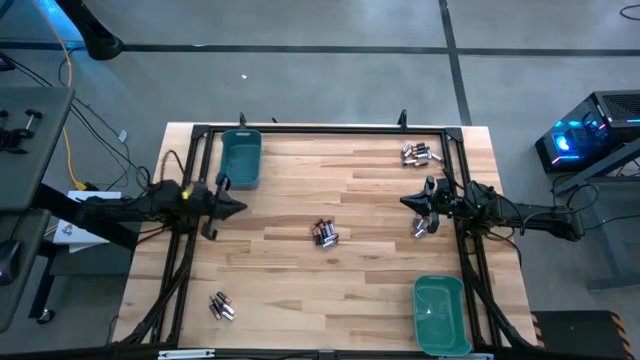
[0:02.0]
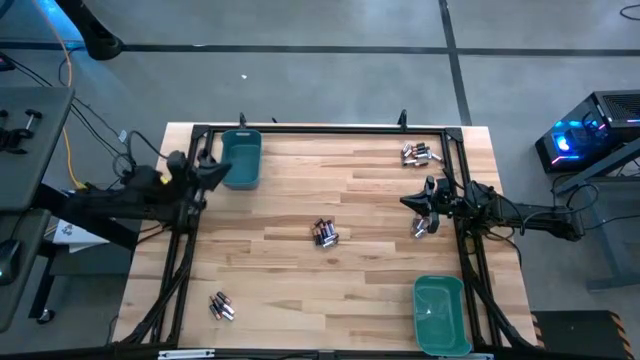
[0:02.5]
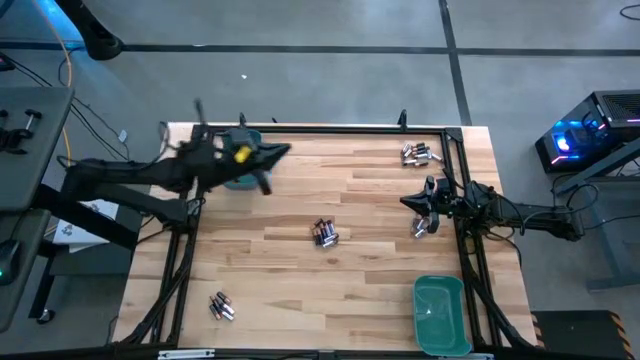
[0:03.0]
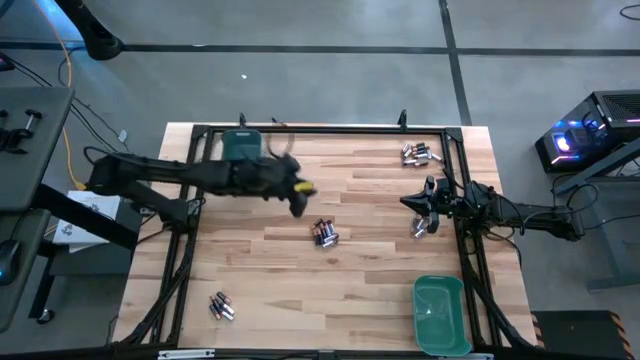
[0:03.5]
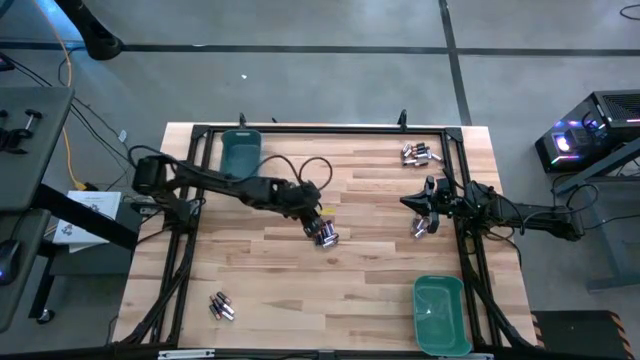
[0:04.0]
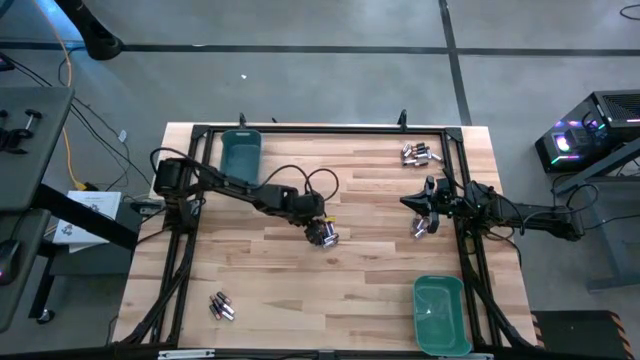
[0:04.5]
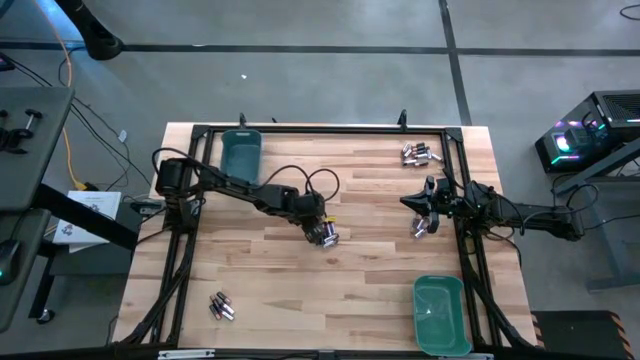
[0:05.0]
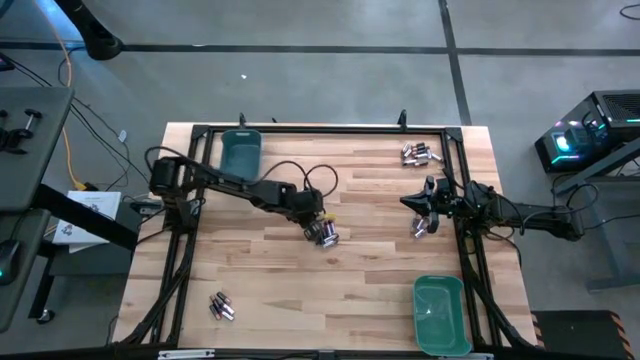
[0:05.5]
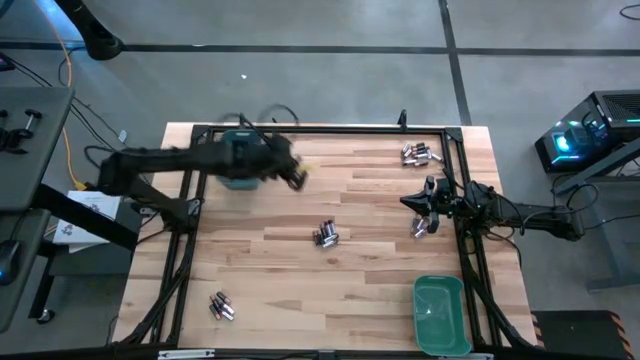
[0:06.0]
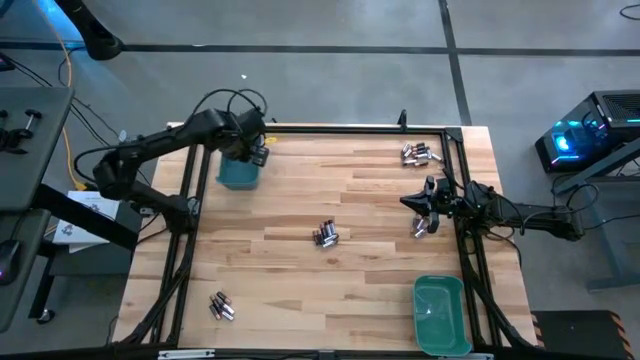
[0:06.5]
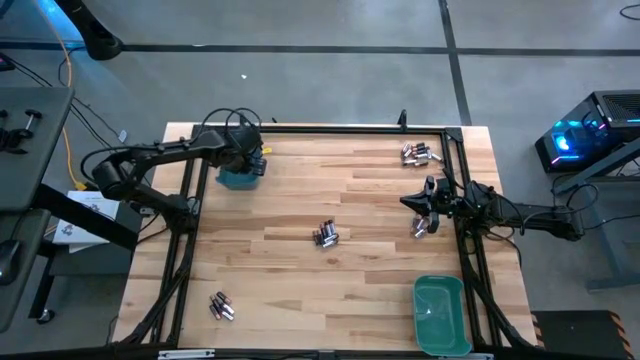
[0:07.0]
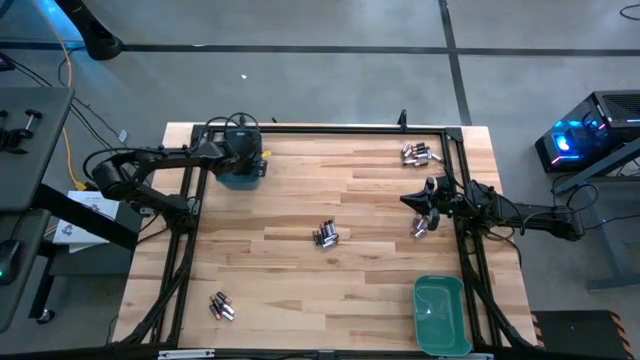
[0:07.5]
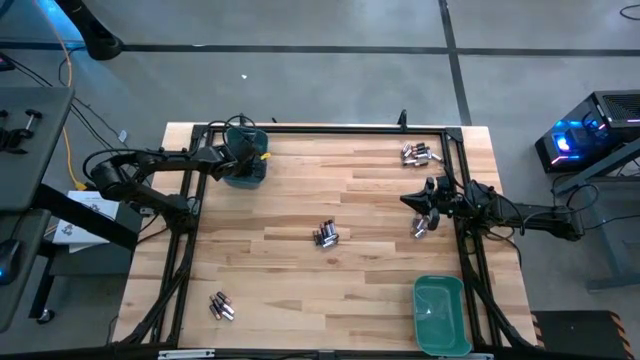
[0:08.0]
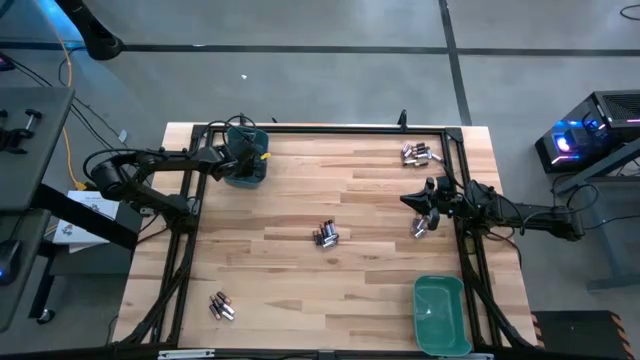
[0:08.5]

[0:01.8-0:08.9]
Task: Sort batteries
Put the black battery into the blue bin

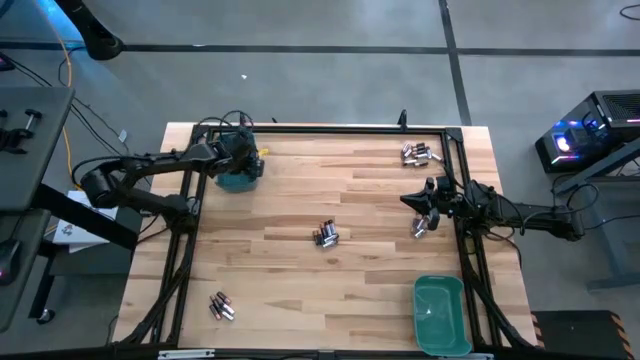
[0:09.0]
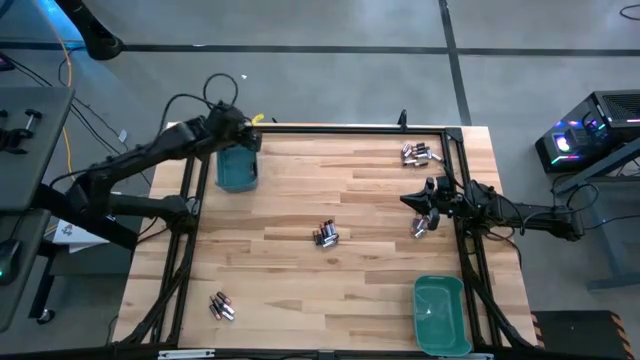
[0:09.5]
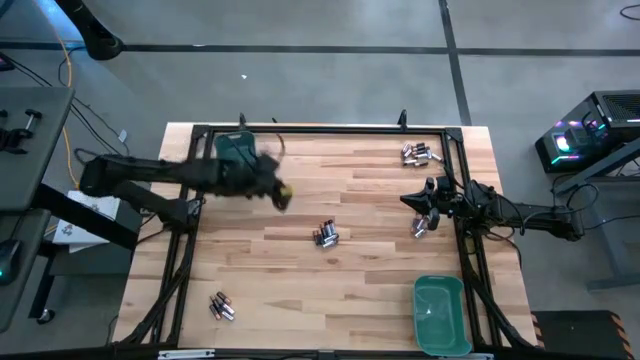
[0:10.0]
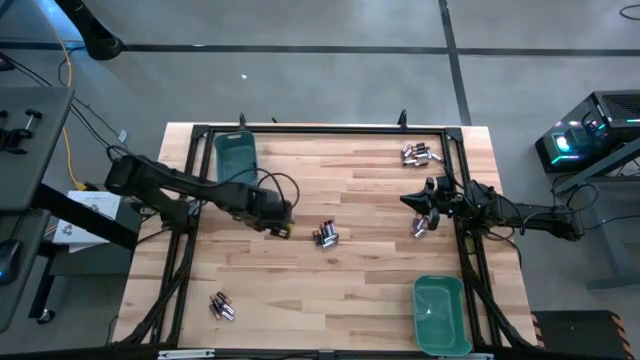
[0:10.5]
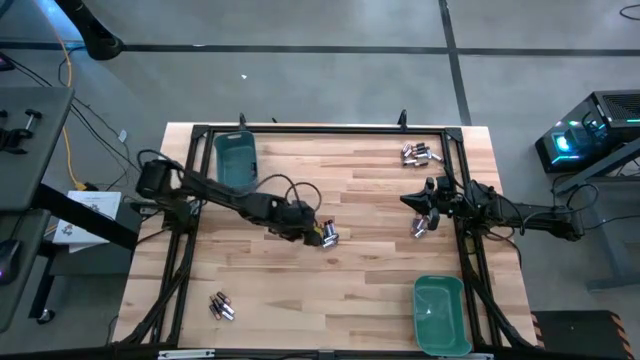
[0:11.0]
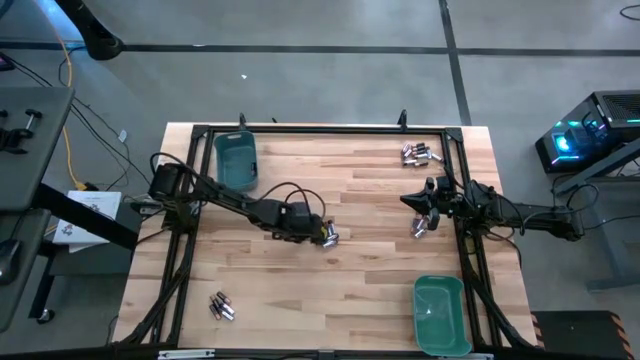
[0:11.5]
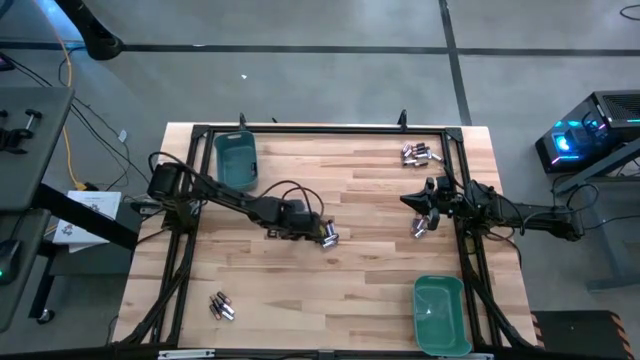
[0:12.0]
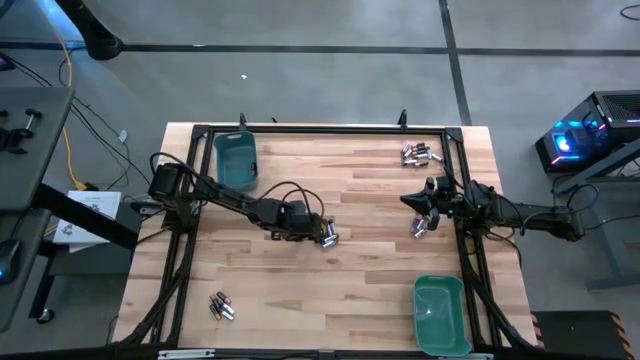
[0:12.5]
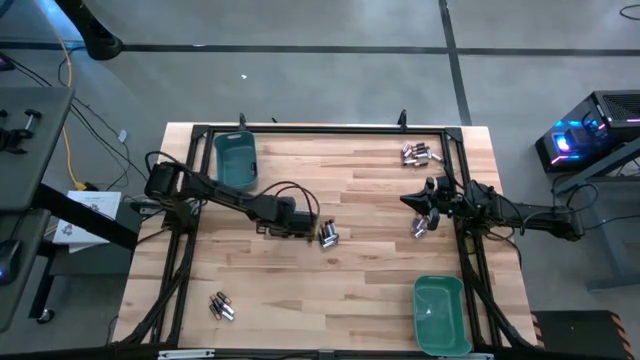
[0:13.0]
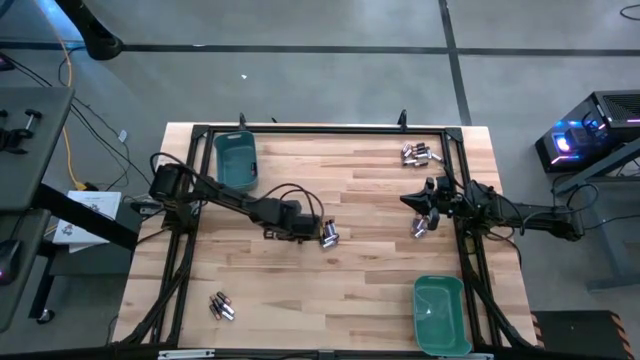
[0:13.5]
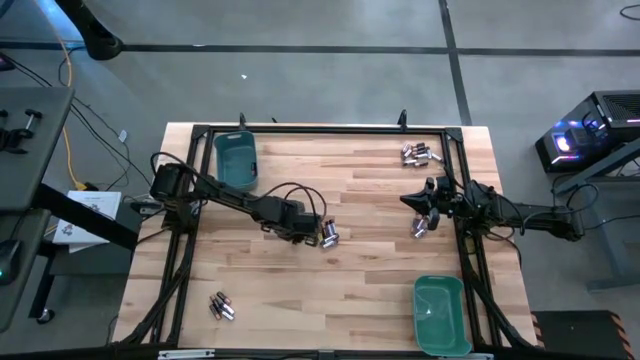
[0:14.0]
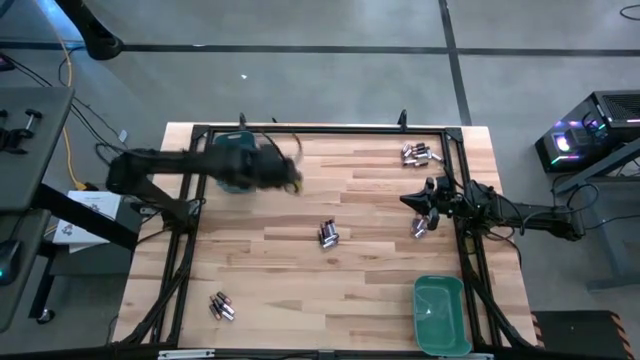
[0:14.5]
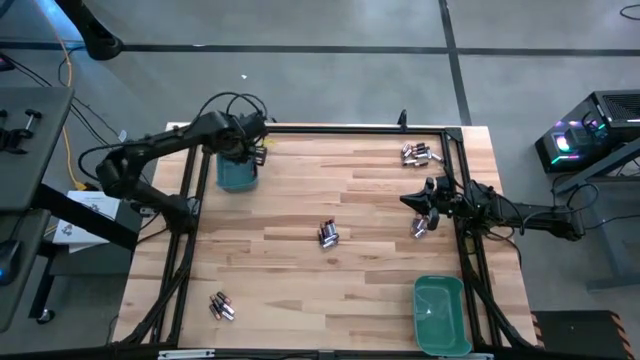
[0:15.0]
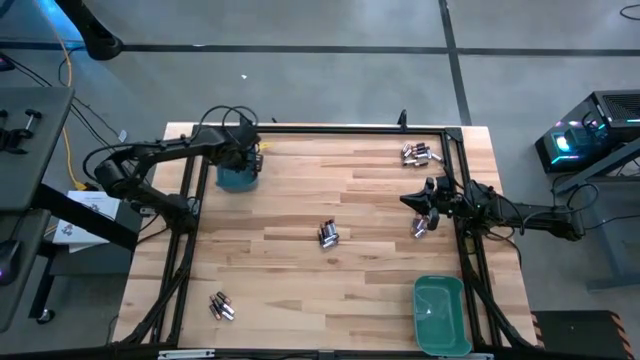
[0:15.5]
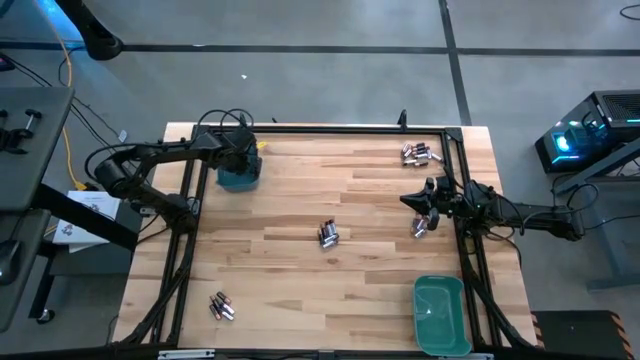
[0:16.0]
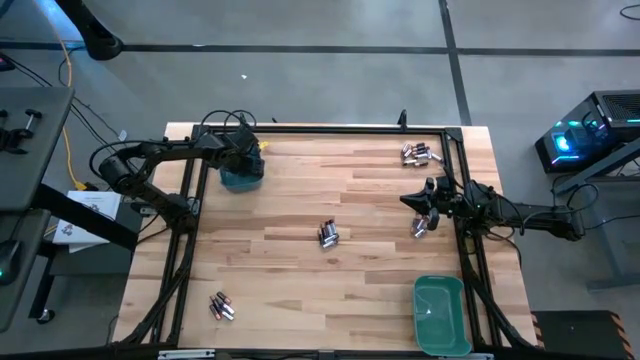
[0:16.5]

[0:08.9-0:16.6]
Put the black battery into the blue bin

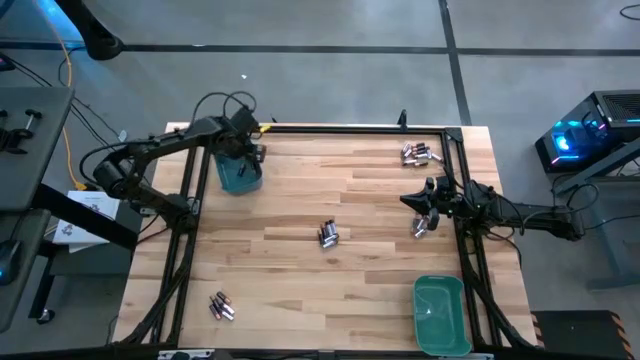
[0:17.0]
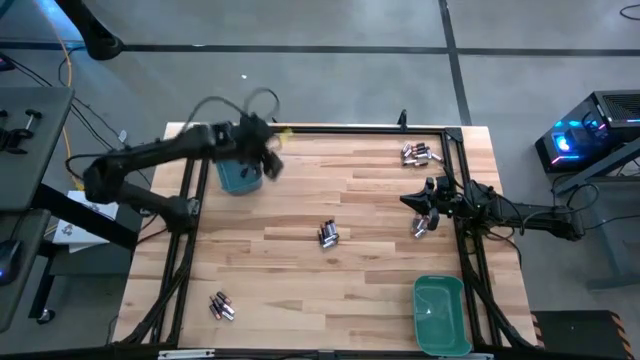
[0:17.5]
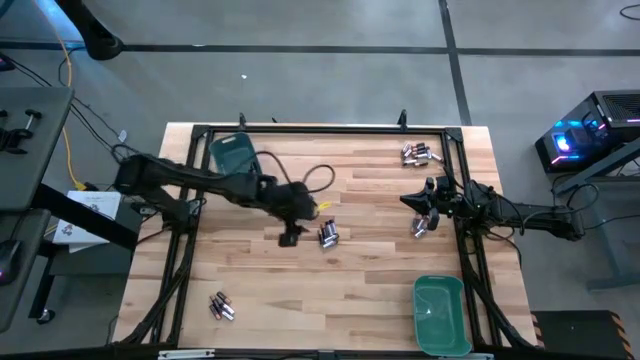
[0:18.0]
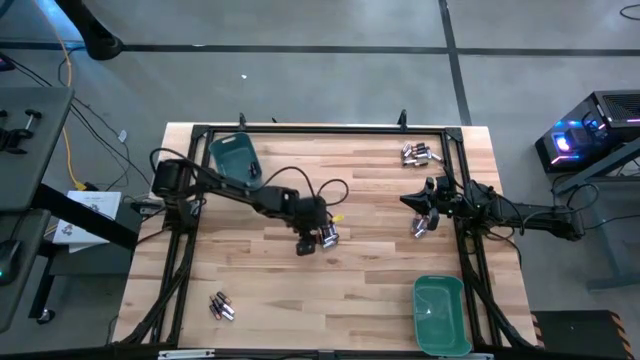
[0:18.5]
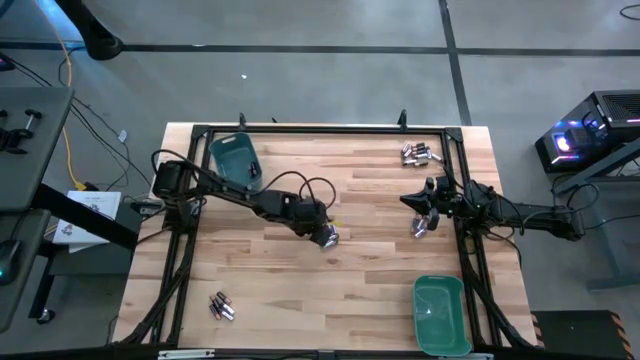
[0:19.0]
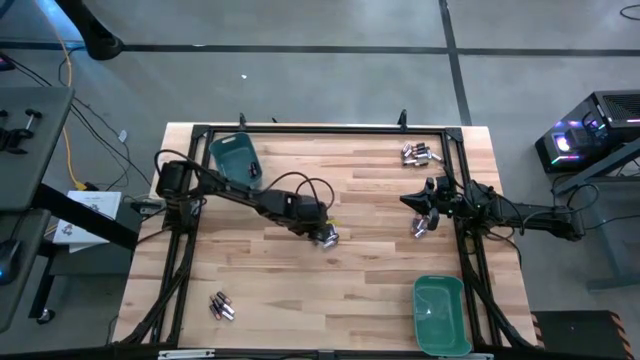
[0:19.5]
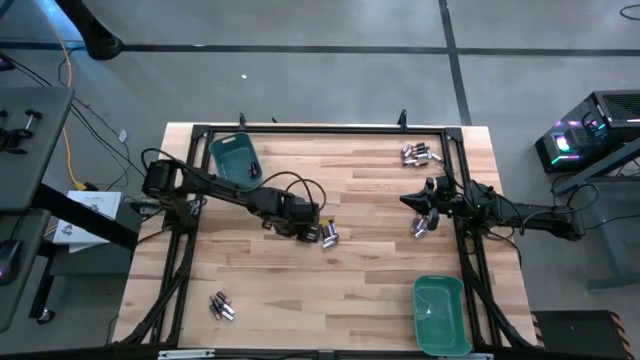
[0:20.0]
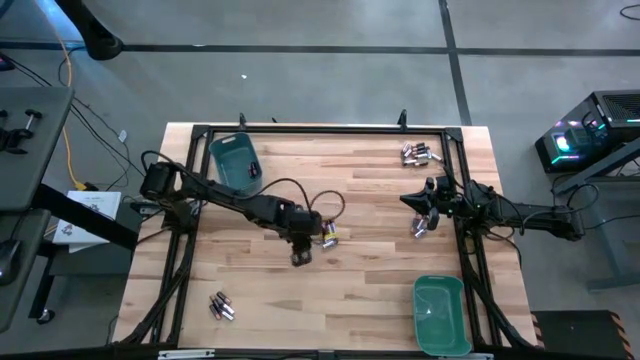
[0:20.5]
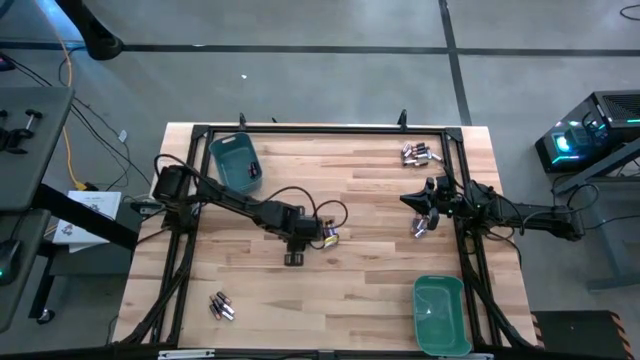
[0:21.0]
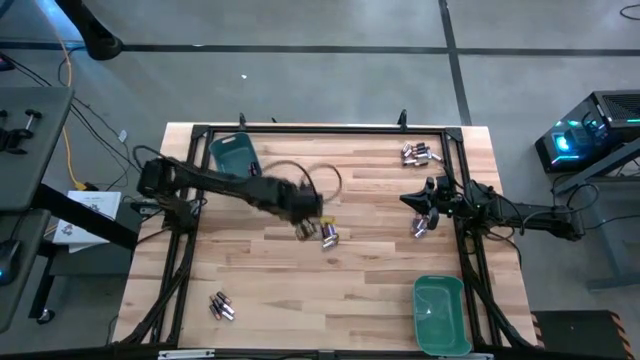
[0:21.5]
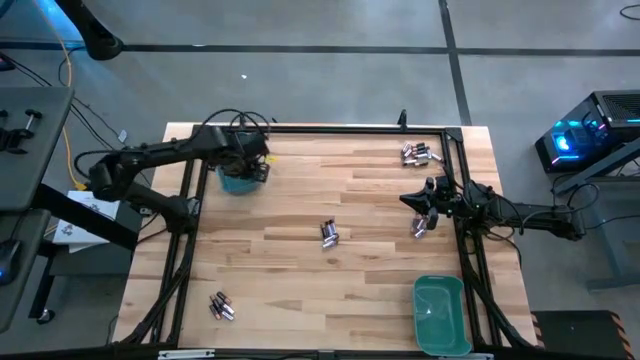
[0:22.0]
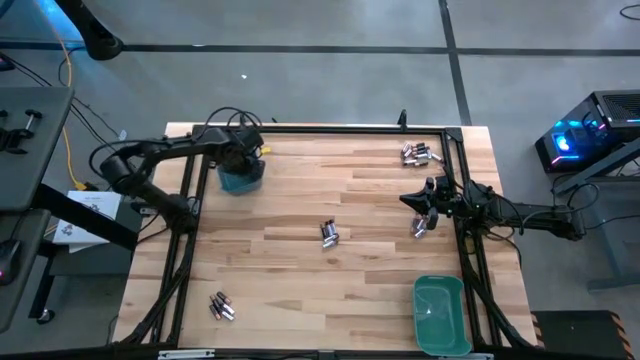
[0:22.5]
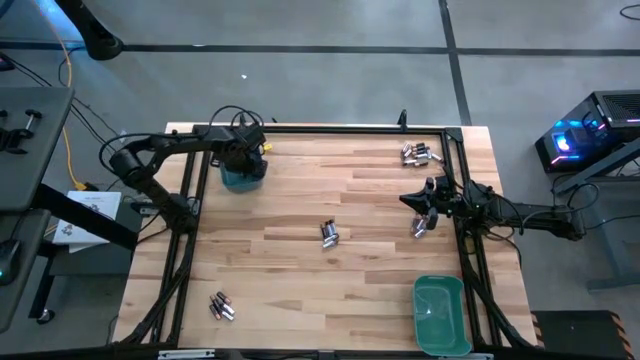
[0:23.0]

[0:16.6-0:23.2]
Put the black battery into the blue bin
